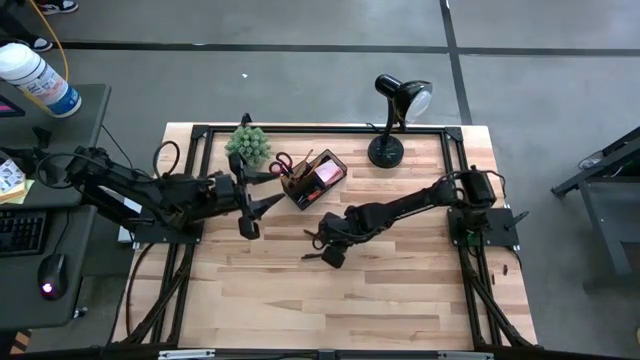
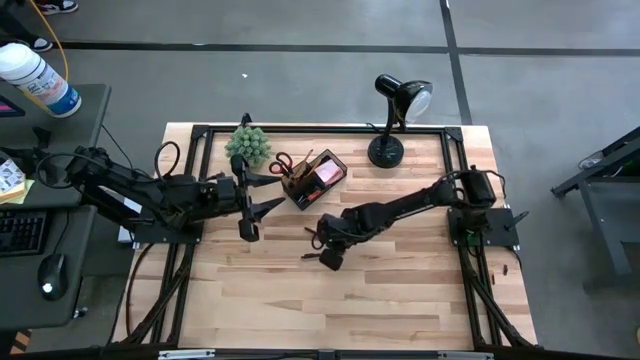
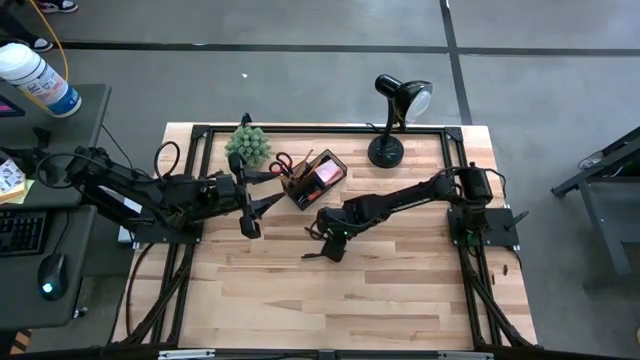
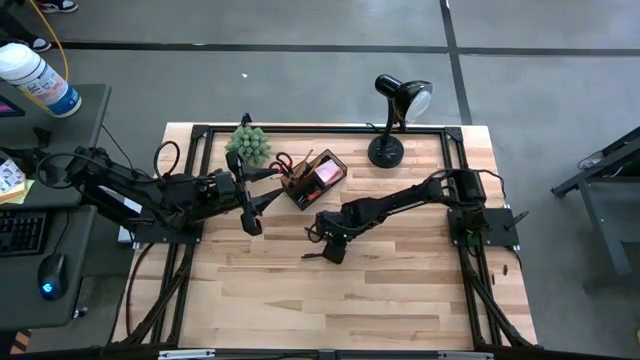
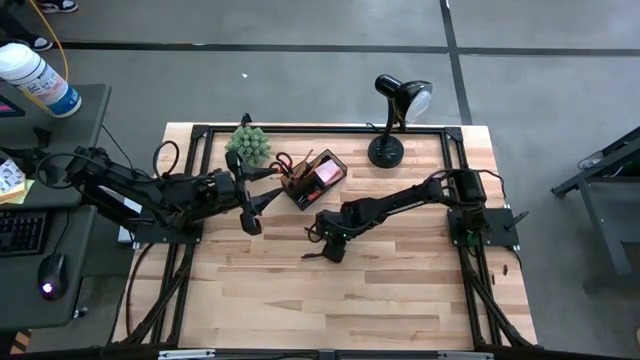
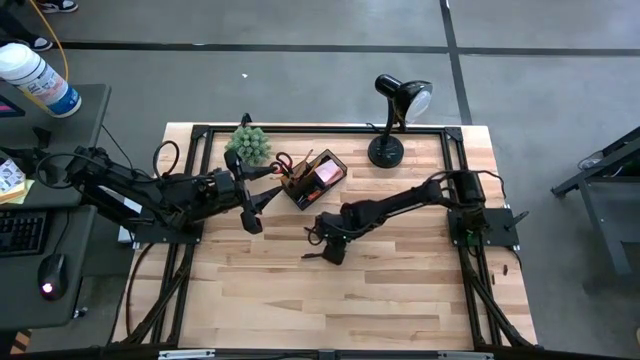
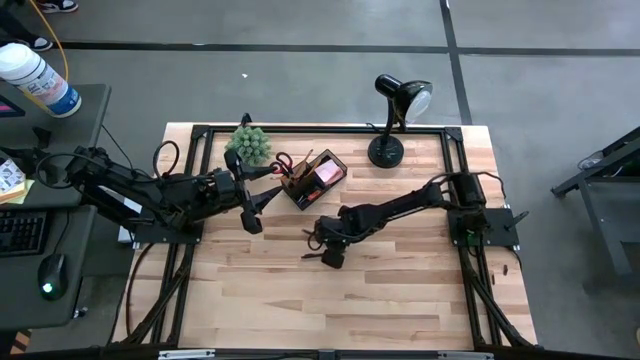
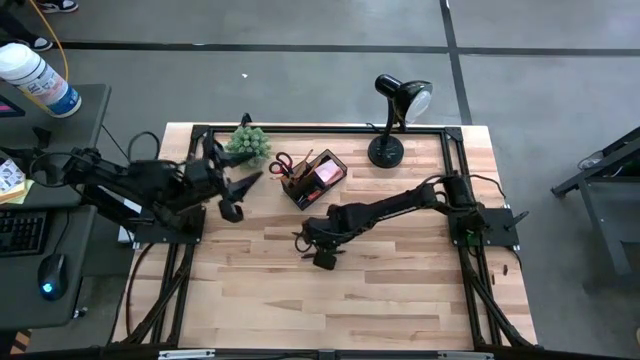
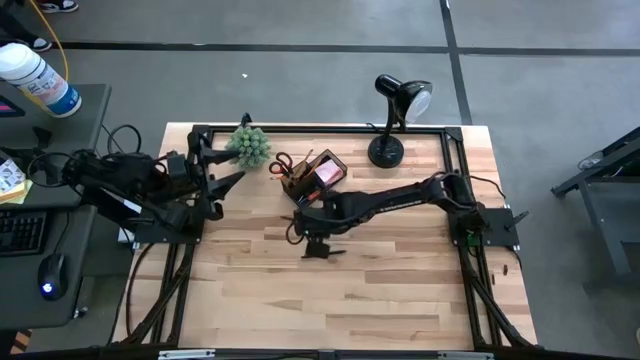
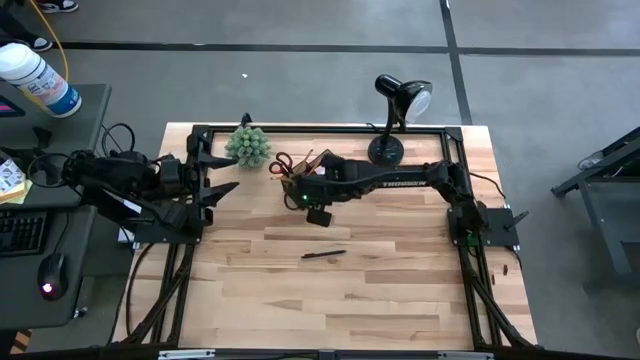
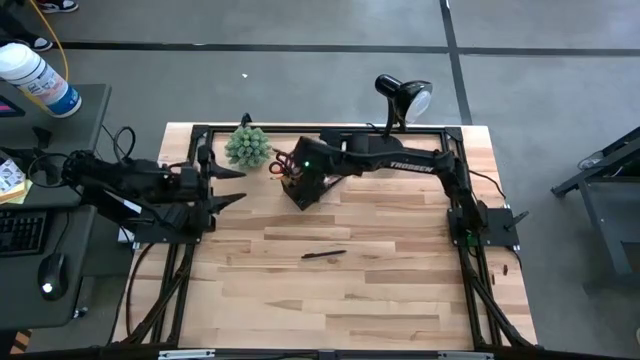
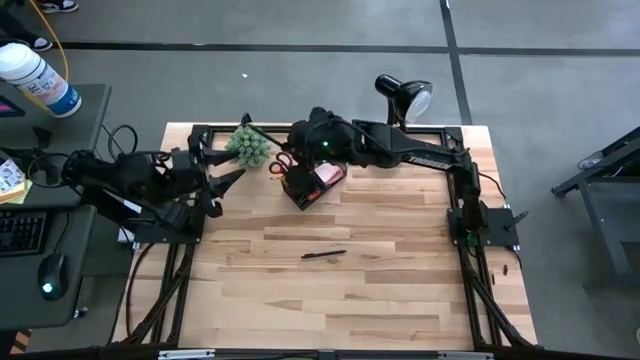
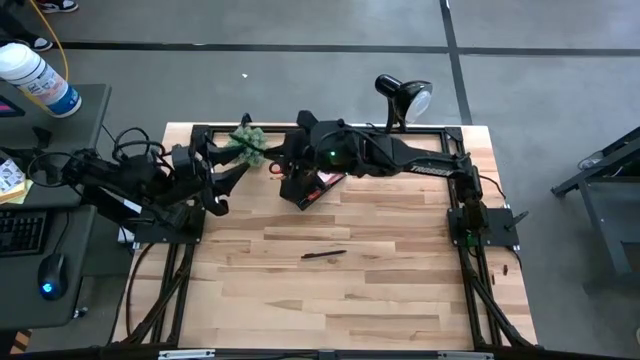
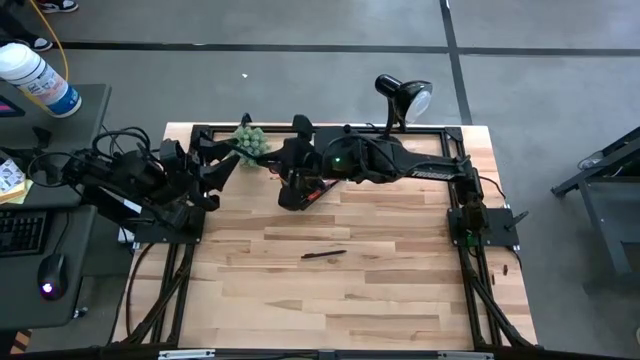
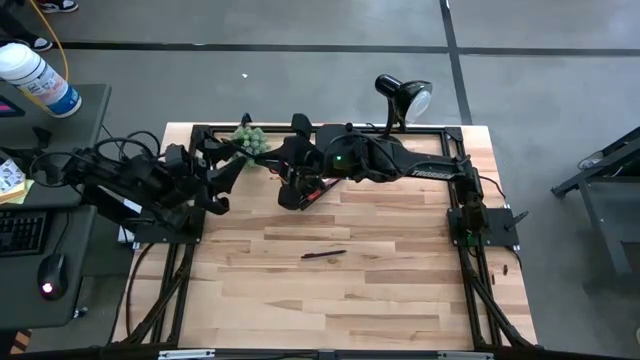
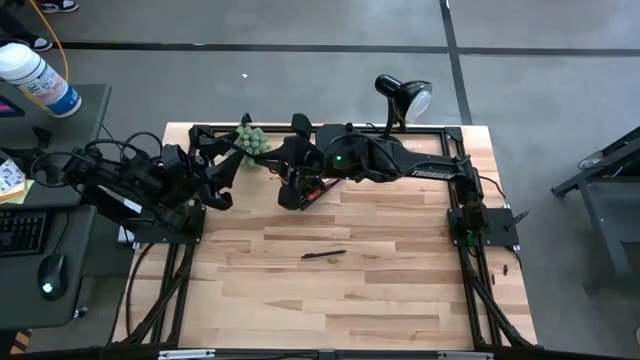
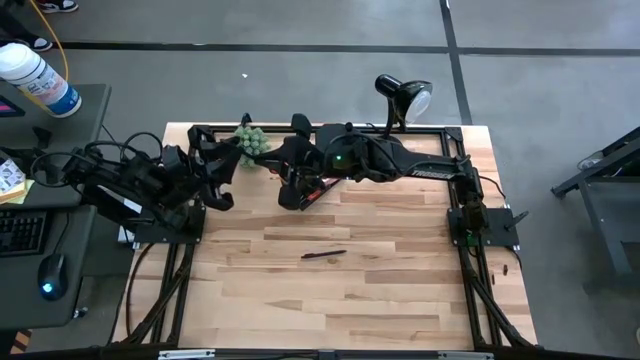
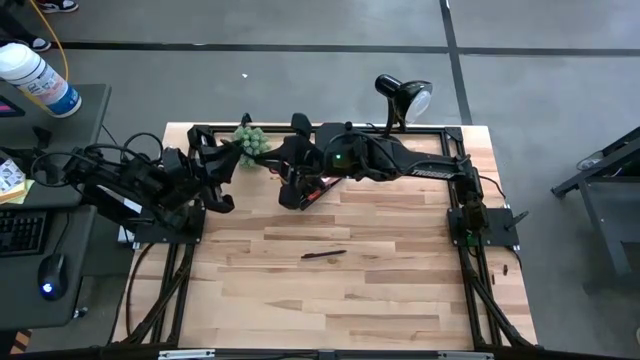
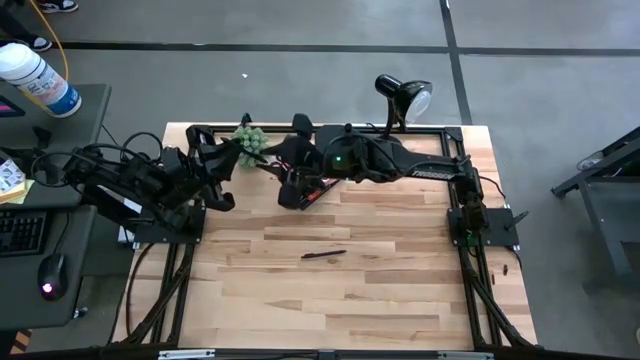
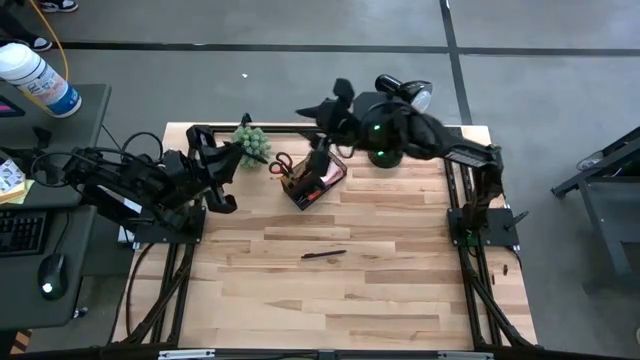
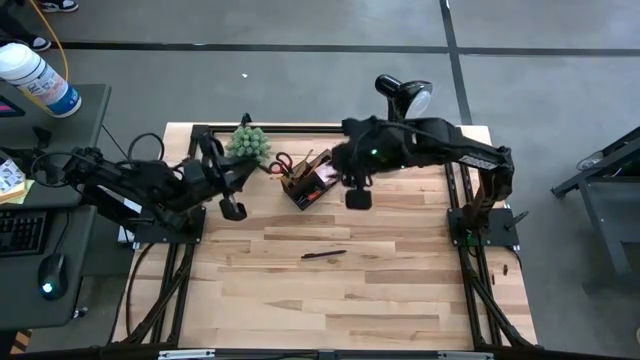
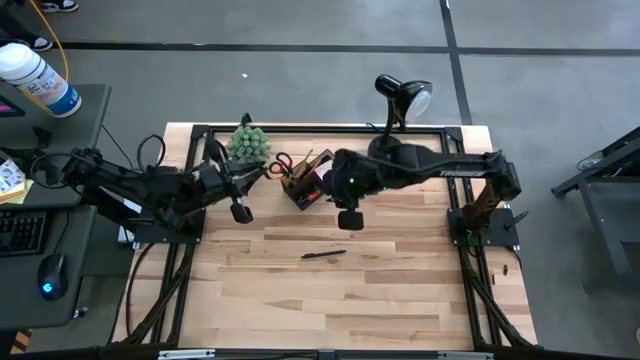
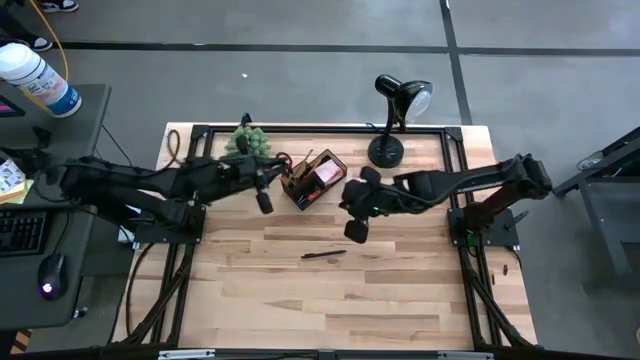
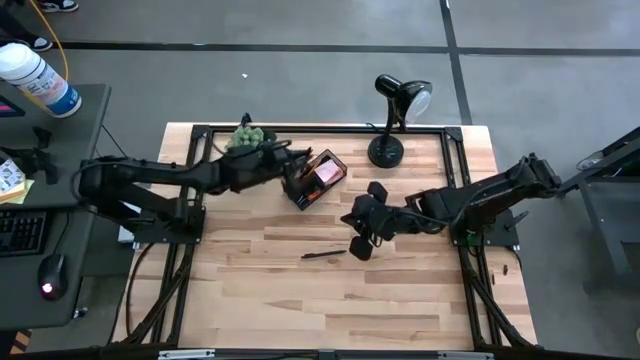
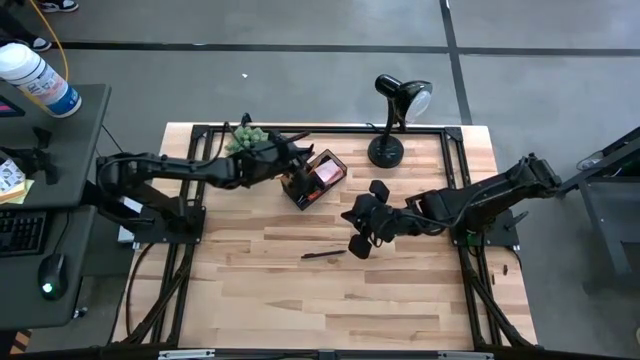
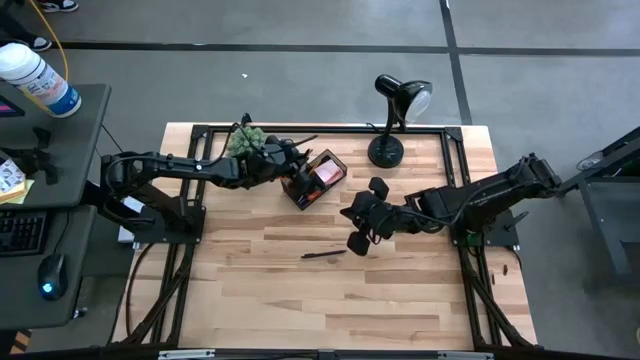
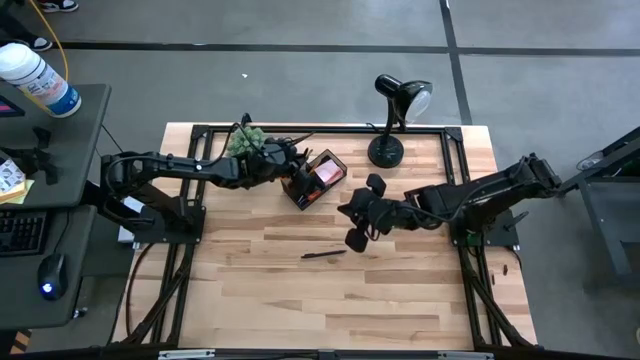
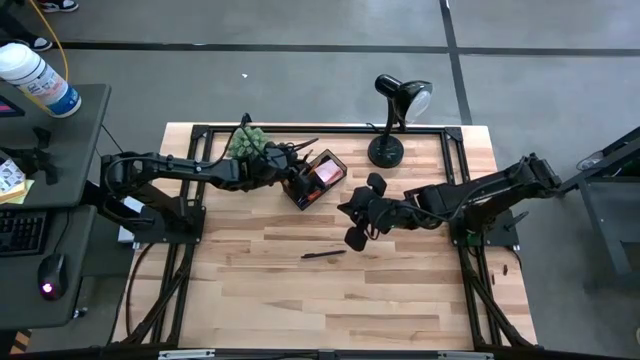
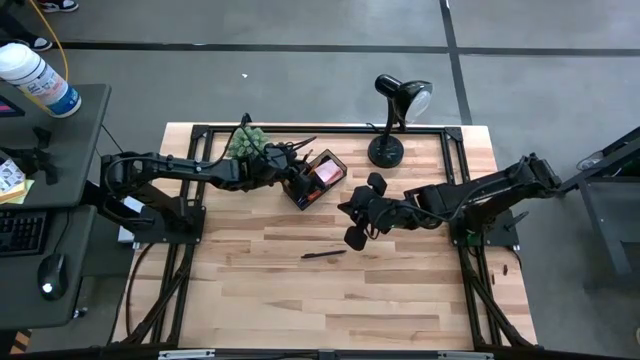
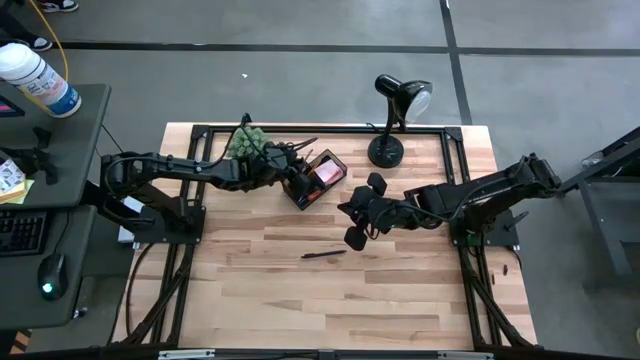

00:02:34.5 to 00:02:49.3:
Task: Pick and place office supplies into organizer
Put the top black pen into the black desk organizer

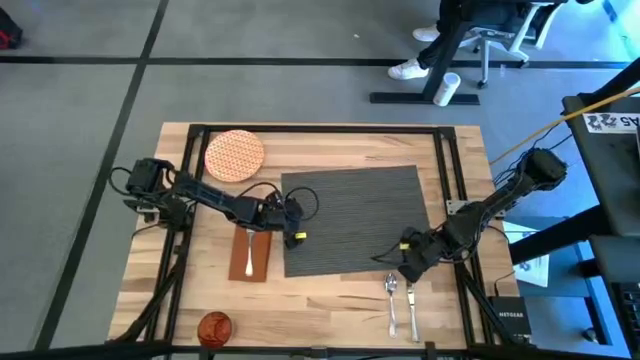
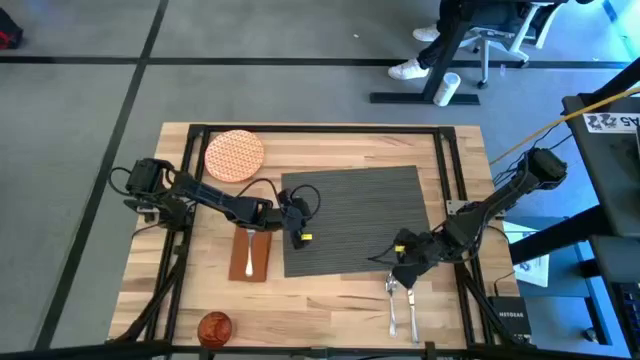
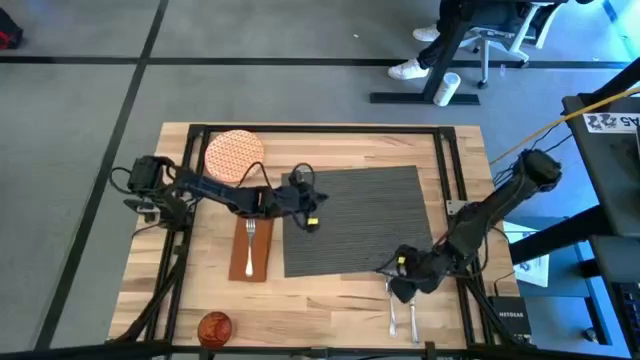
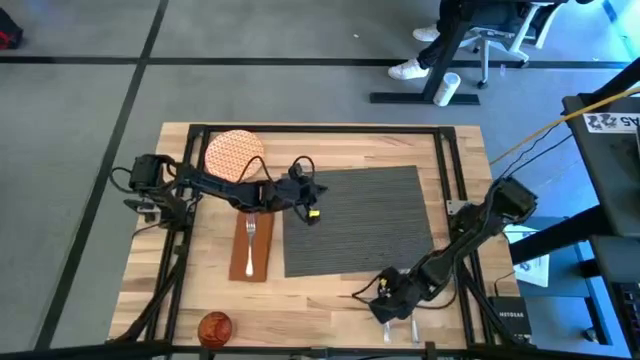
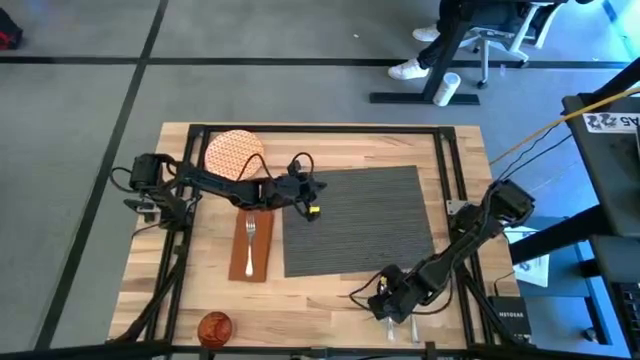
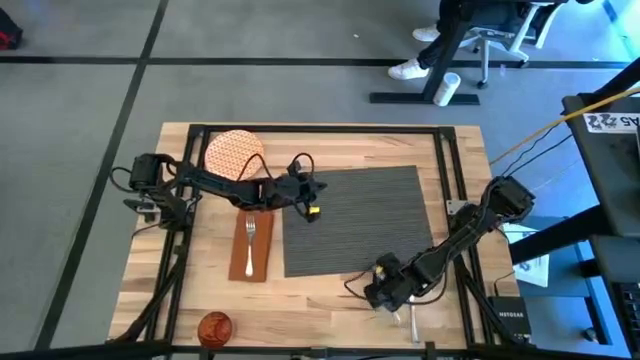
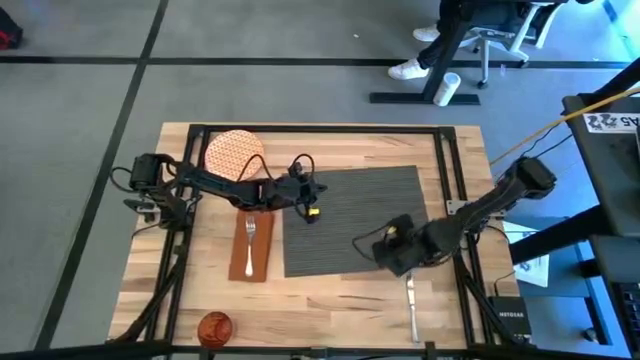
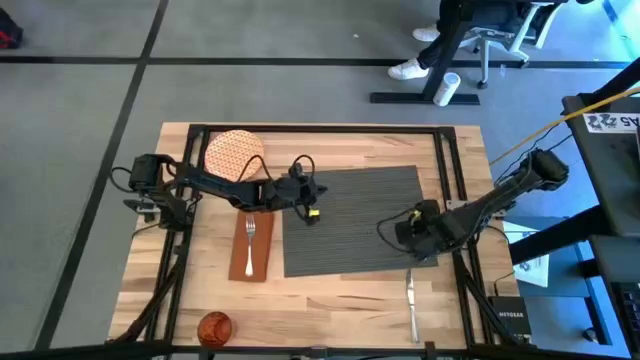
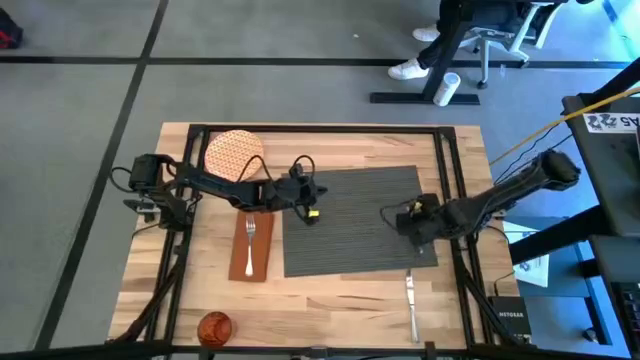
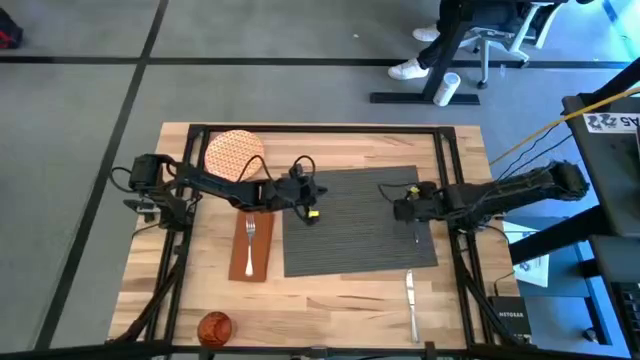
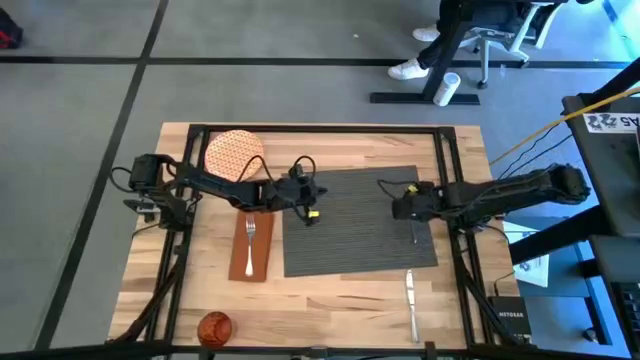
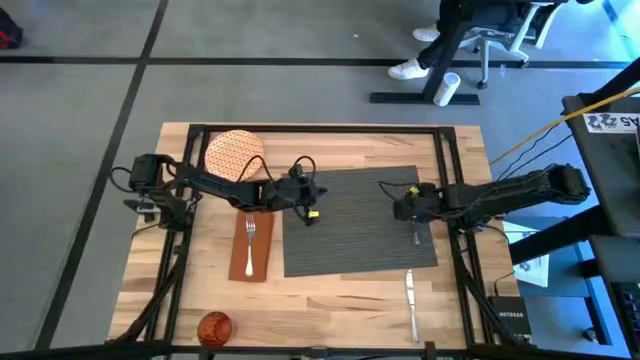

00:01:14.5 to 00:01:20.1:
Task: Set table place
Put the silver spoon on the gray tablemat

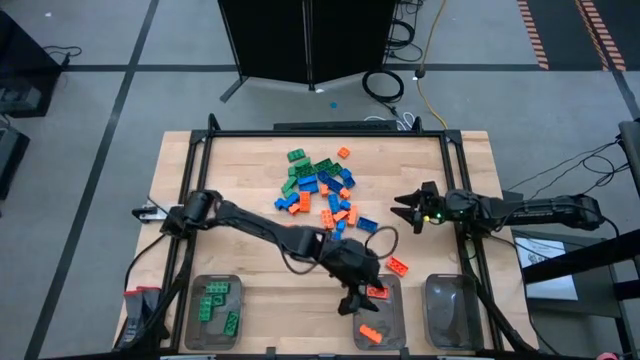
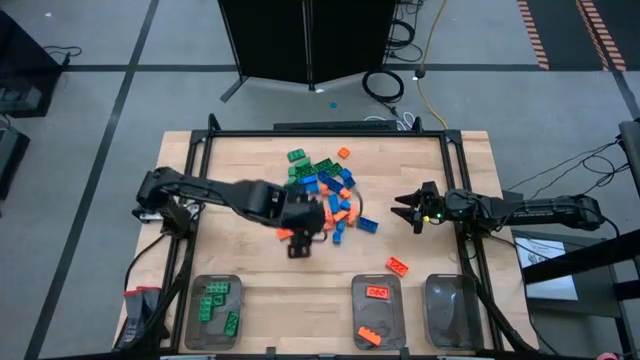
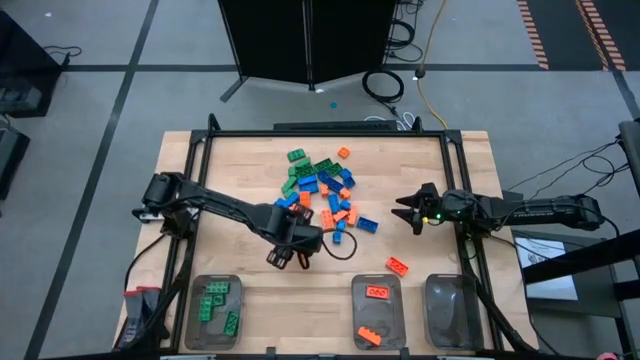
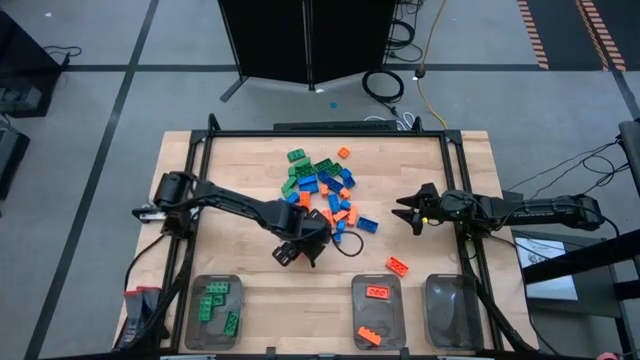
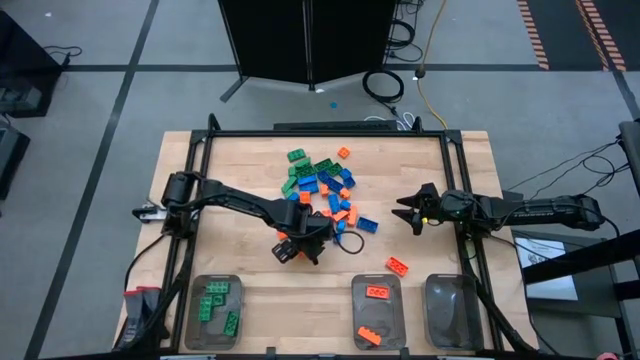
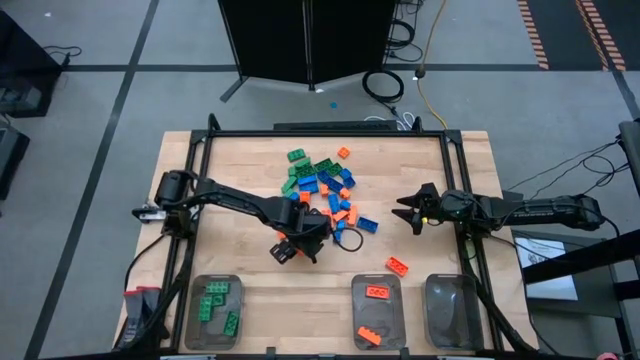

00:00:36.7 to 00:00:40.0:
Task: Sort blocks
Put the orange game piece into the center black bin
